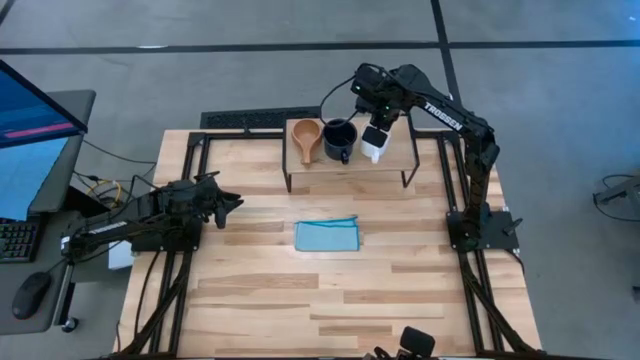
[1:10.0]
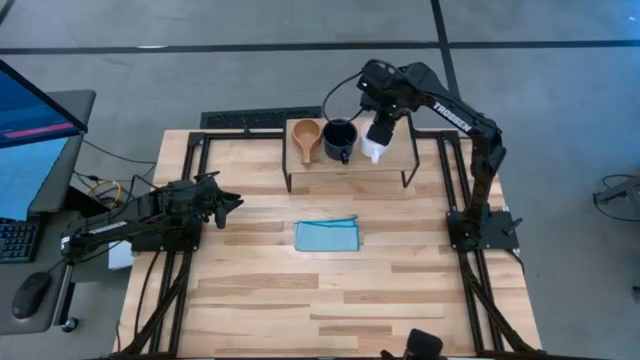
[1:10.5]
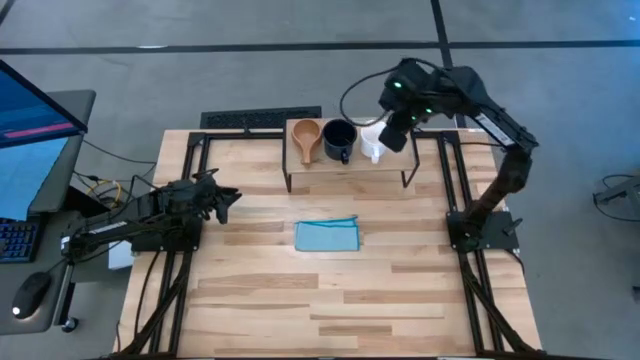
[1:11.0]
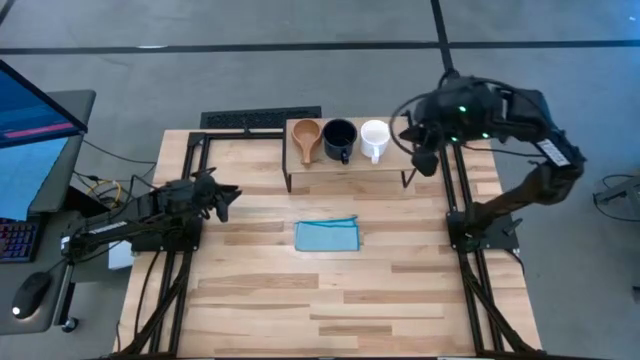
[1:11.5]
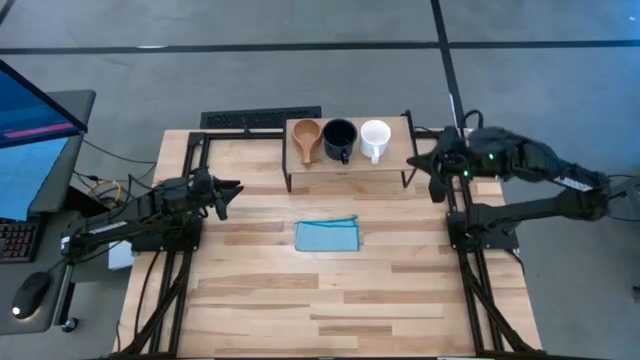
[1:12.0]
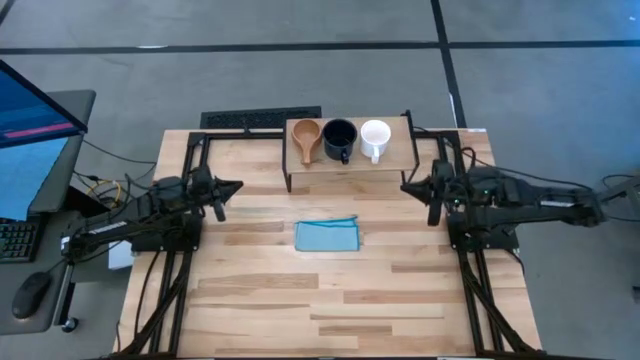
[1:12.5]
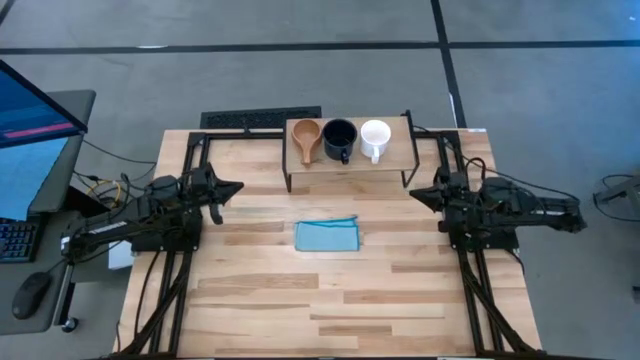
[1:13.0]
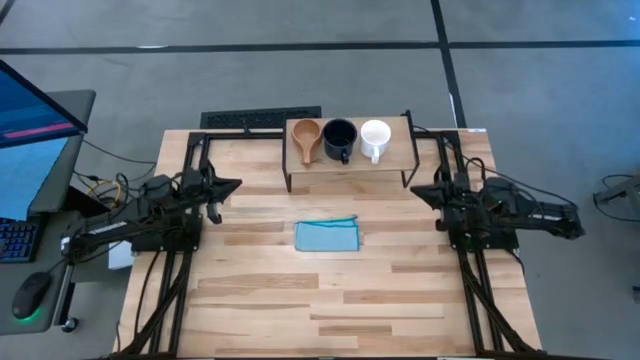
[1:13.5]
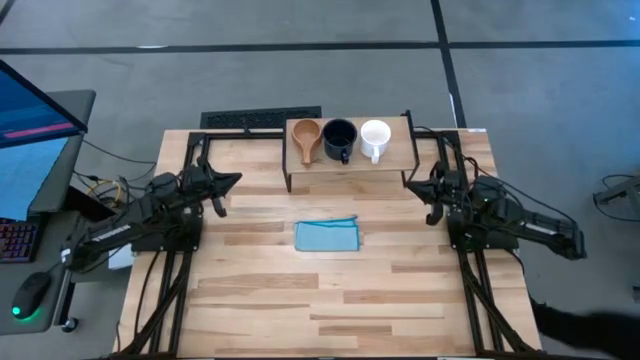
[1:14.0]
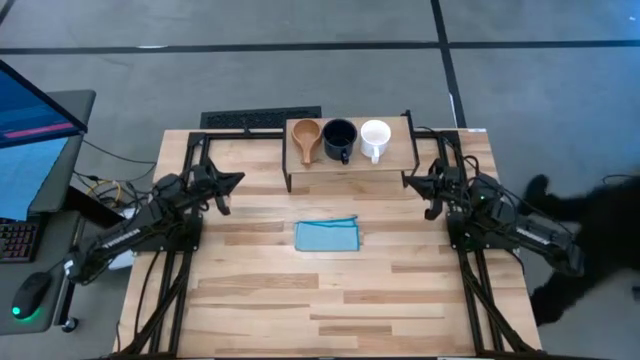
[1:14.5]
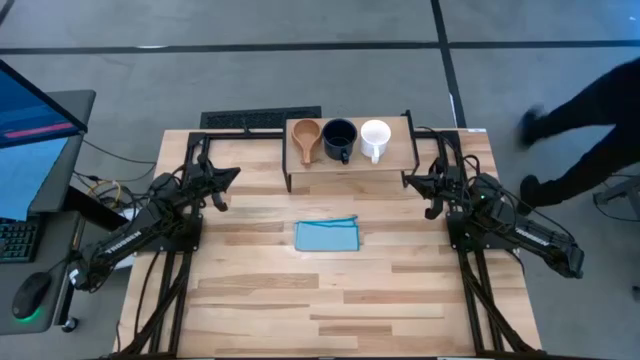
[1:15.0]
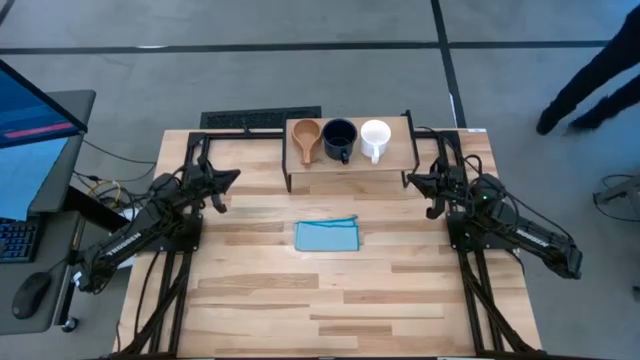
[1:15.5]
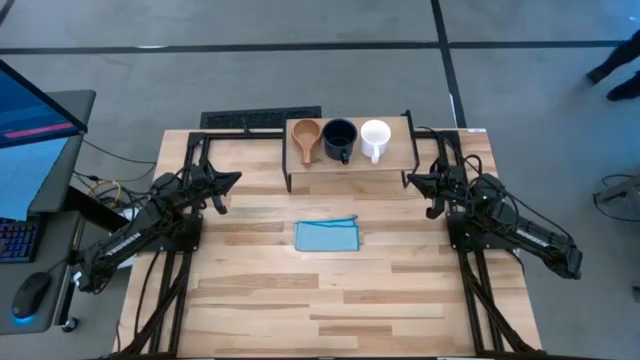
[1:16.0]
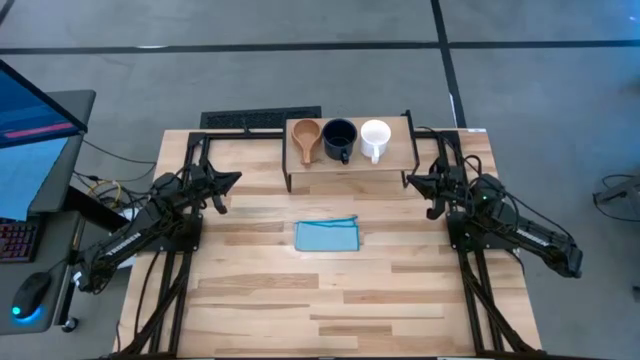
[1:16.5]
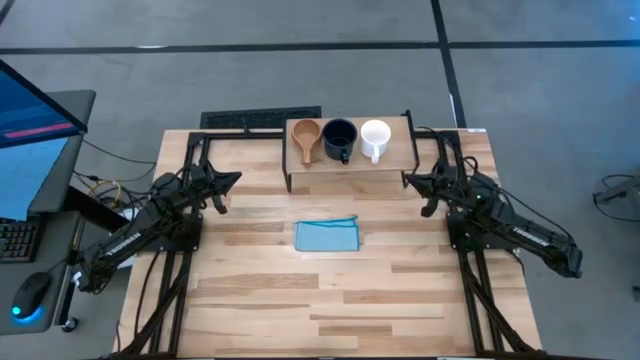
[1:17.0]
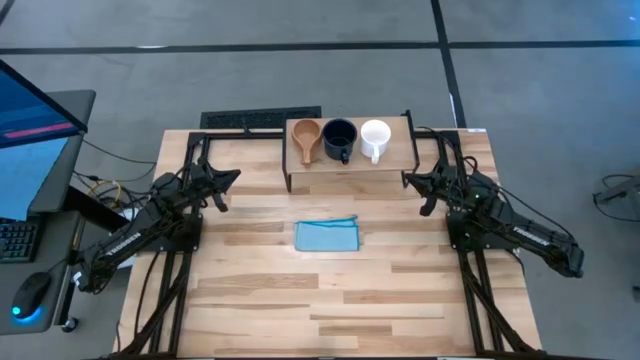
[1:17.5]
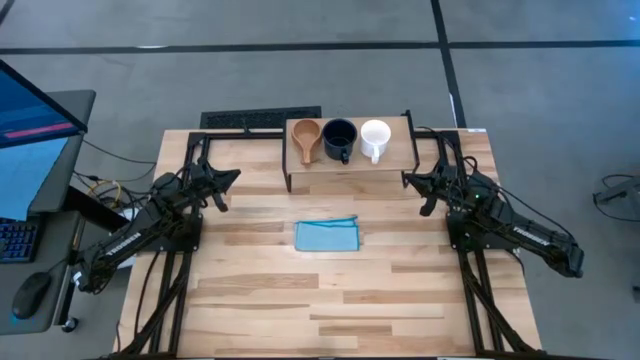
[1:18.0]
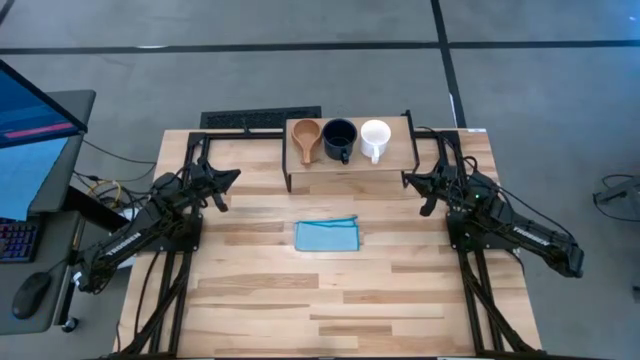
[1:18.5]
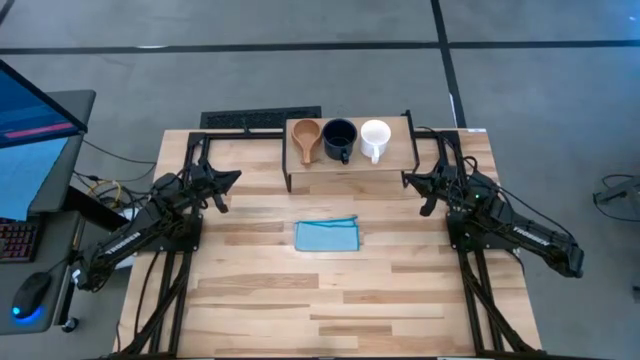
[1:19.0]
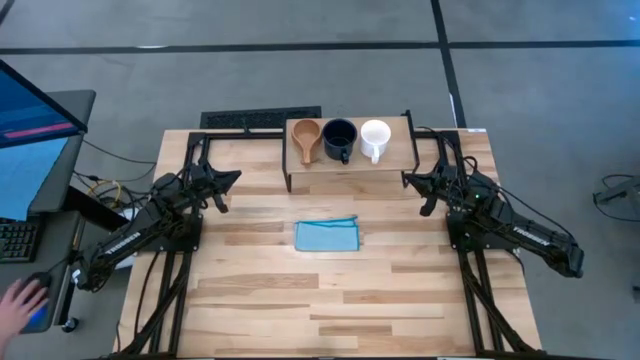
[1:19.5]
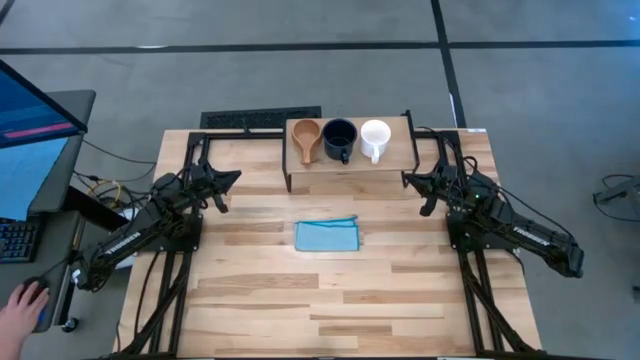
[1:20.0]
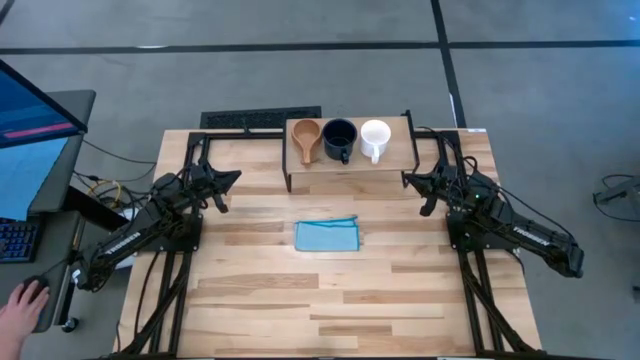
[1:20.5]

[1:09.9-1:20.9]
Task: Stack small to large cups/mugs on shelf
Return to Home Position

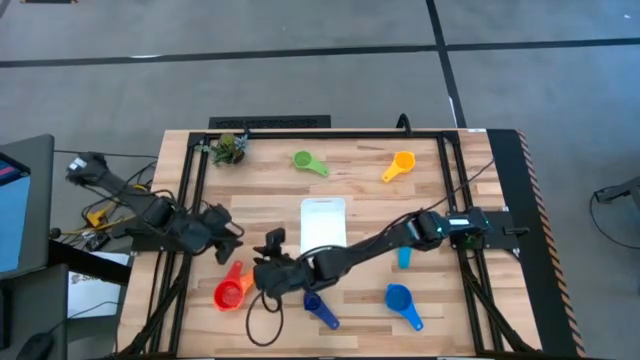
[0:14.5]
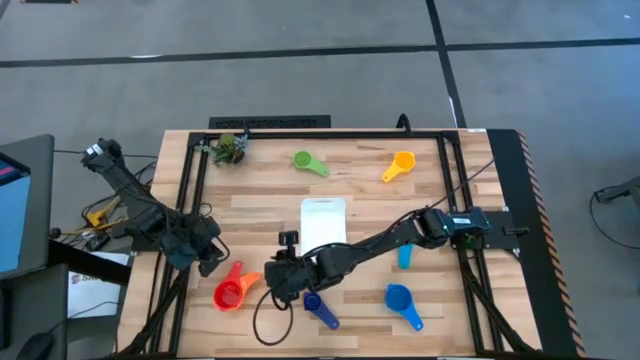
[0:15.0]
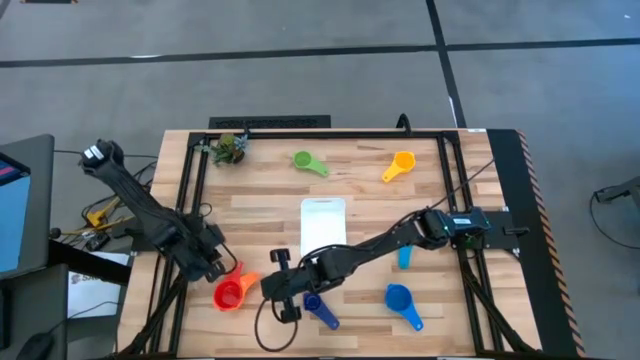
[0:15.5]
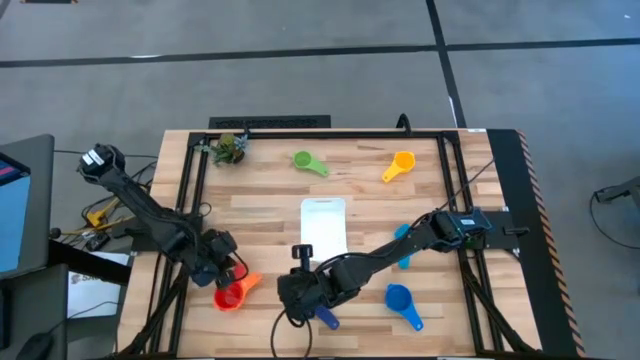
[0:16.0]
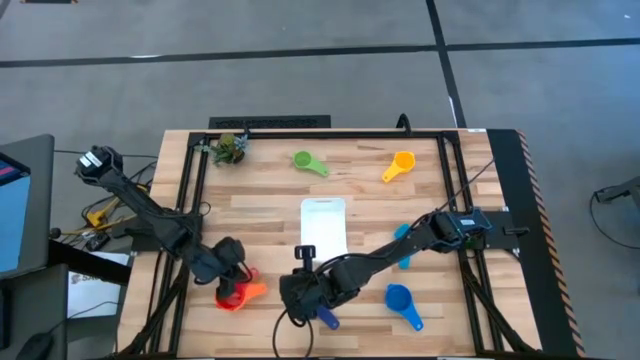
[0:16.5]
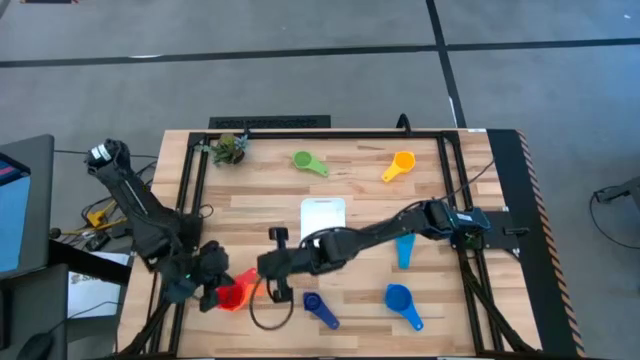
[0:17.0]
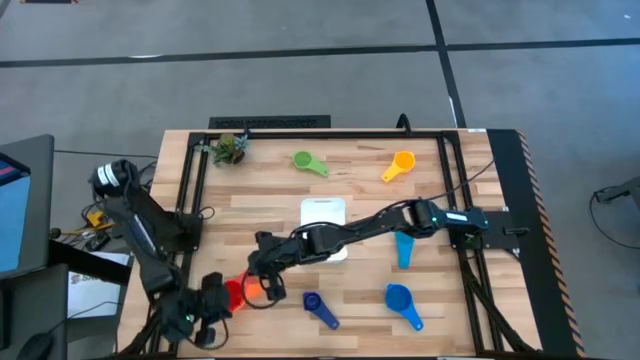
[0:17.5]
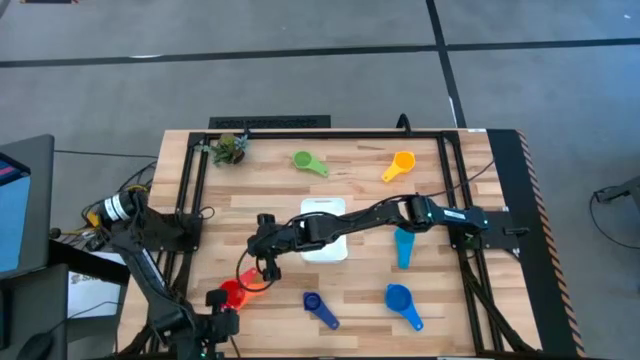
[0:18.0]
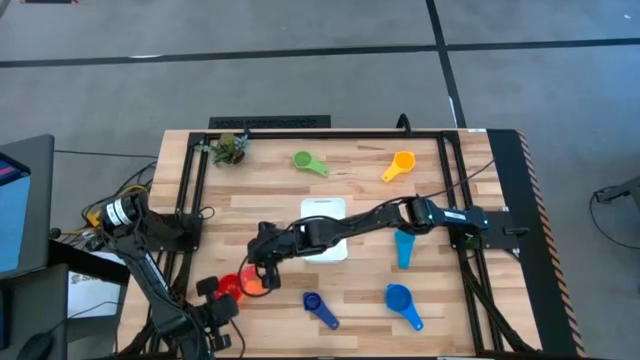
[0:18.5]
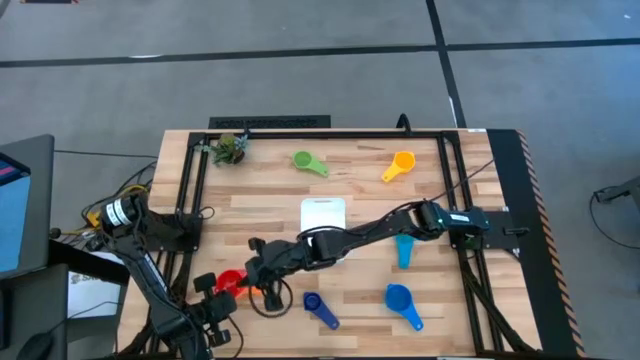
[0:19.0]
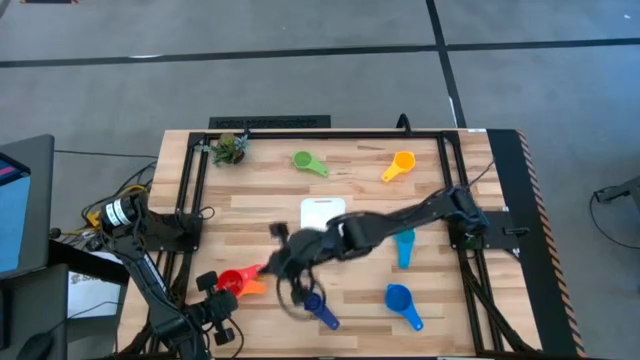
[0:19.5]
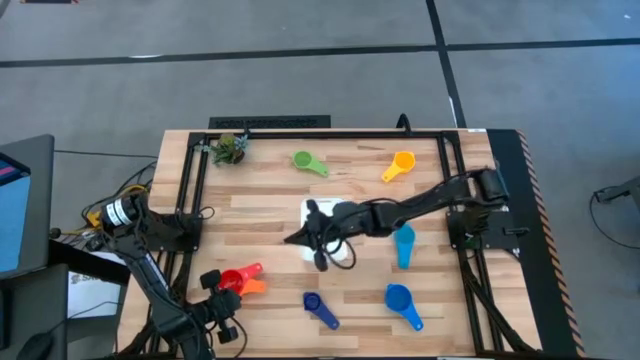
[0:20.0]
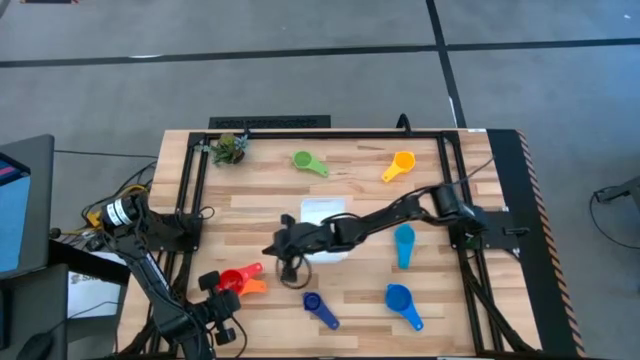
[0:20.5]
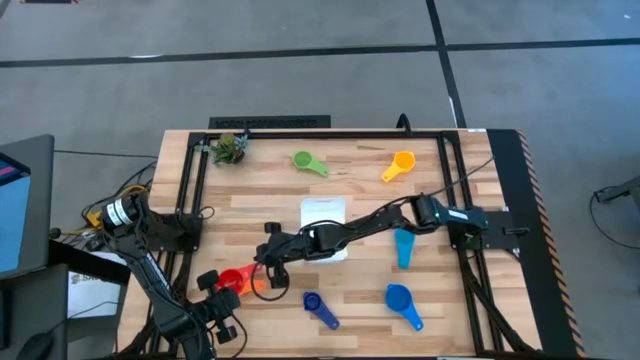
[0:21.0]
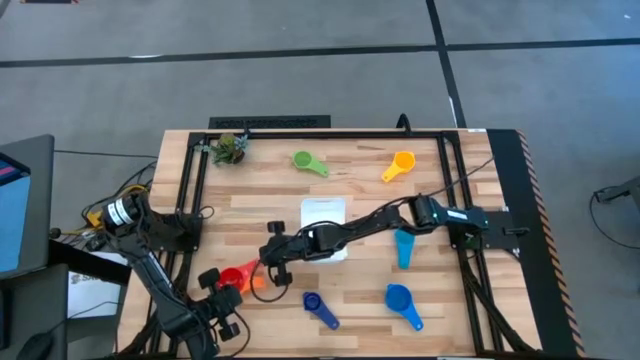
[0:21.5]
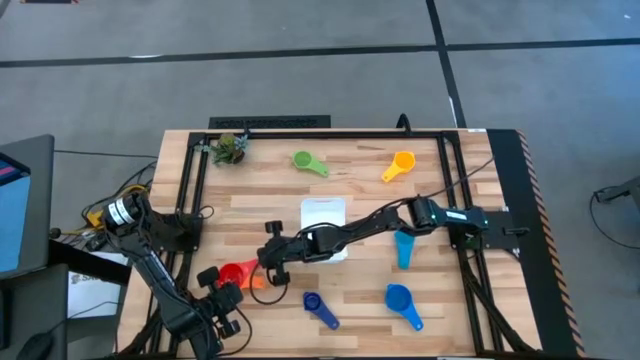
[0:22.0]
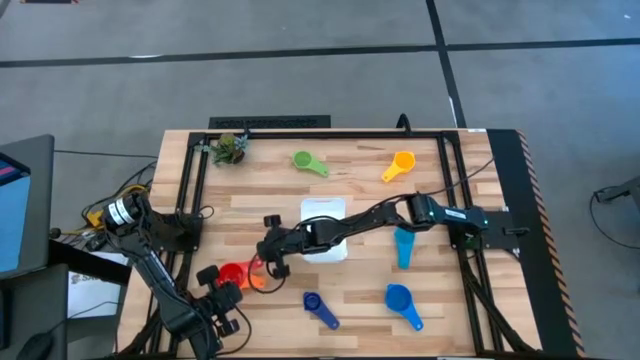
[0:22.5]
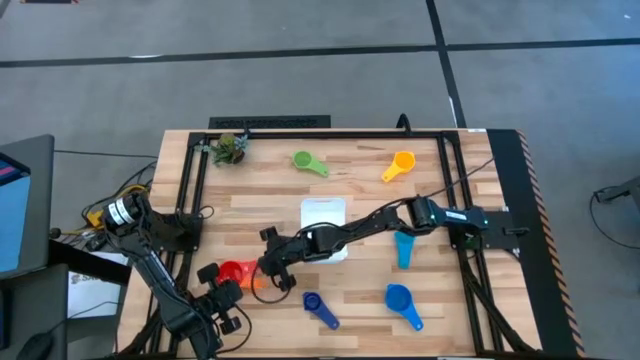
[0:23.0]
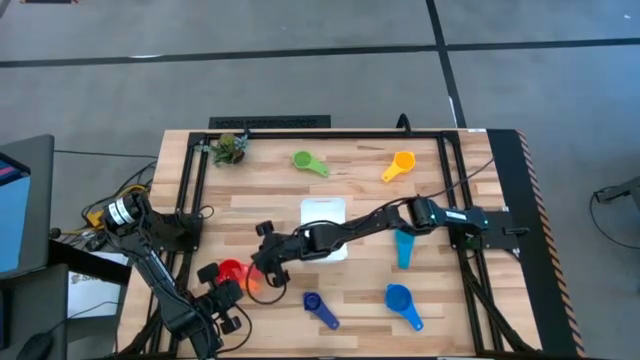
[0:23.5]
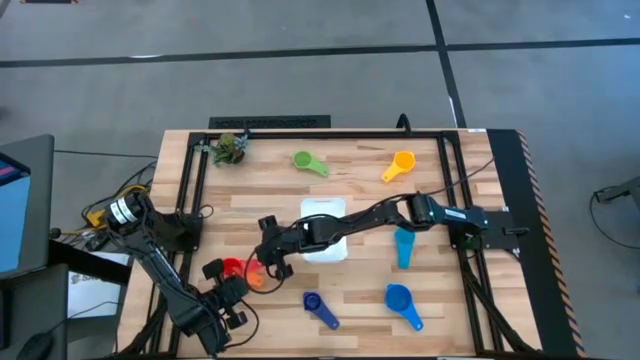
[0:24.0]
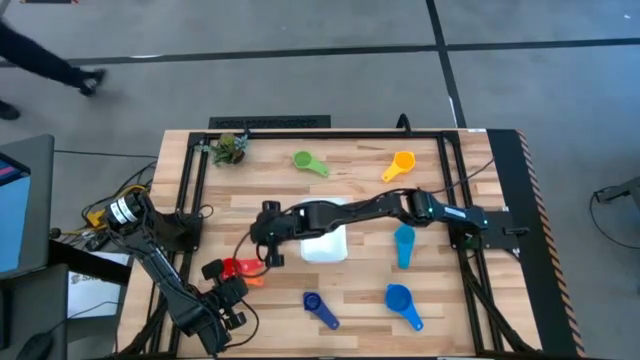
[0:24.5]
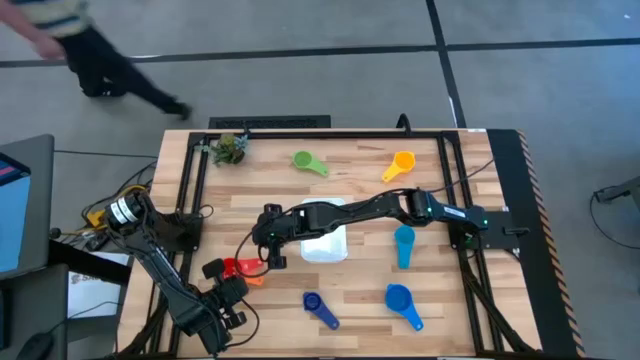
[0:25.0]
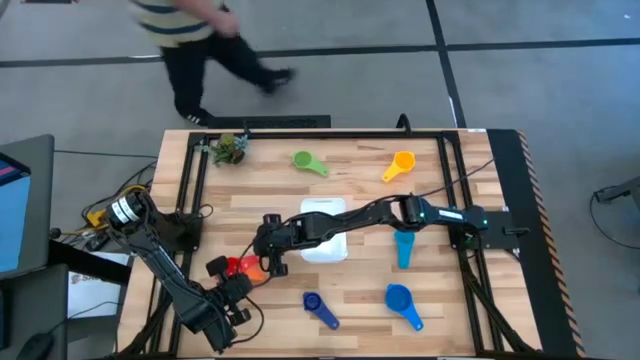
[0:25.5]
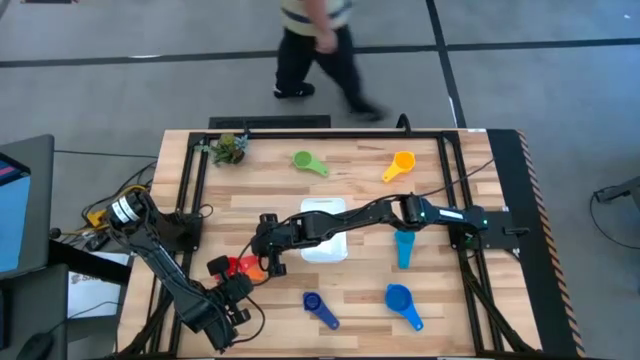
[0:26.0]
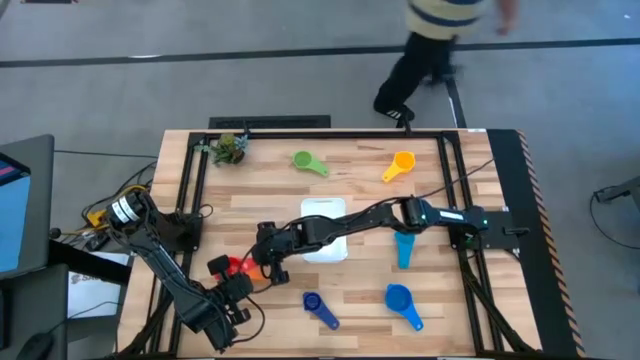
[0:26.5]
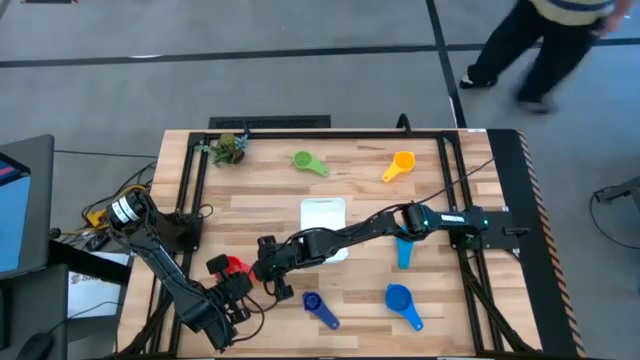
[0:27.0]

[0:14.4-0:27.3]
Task: Nest measuring cups in basket
Stack the red measuring cup on top of the orange measuring cup
